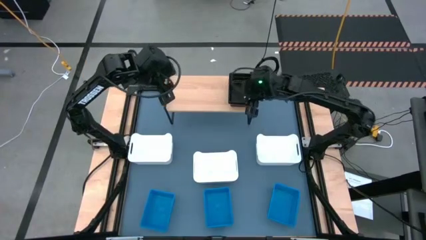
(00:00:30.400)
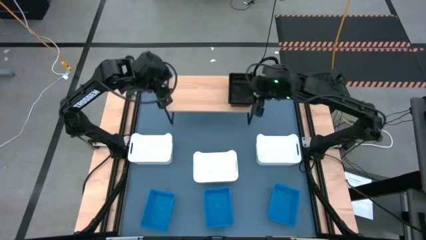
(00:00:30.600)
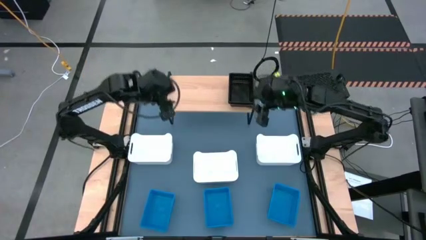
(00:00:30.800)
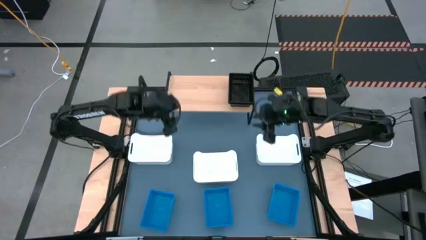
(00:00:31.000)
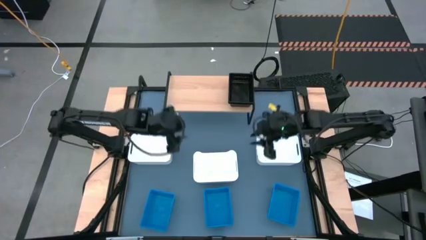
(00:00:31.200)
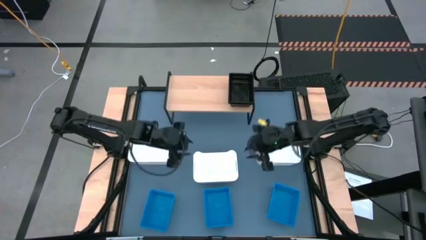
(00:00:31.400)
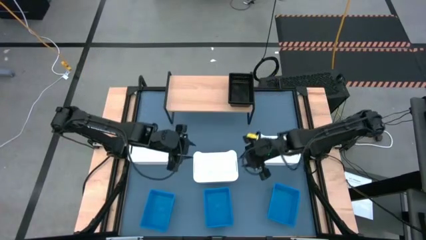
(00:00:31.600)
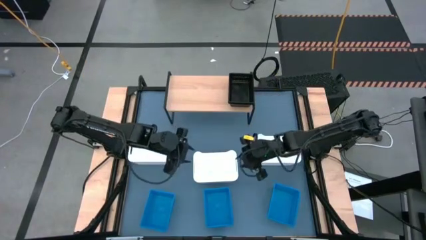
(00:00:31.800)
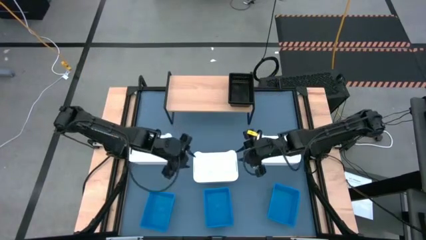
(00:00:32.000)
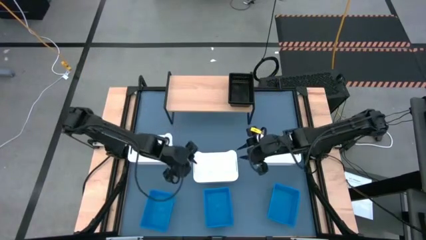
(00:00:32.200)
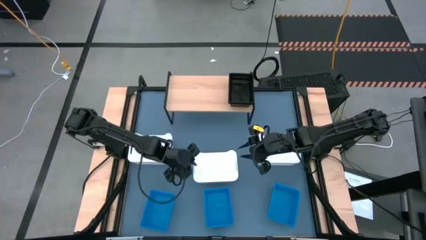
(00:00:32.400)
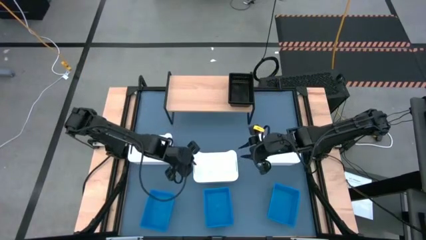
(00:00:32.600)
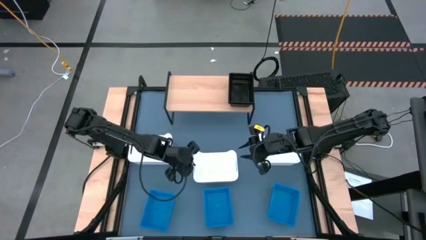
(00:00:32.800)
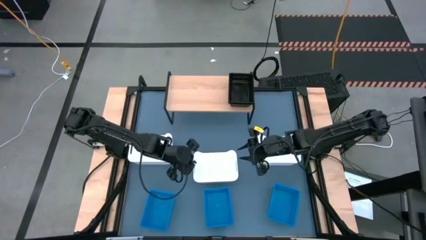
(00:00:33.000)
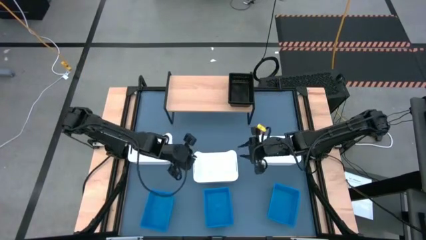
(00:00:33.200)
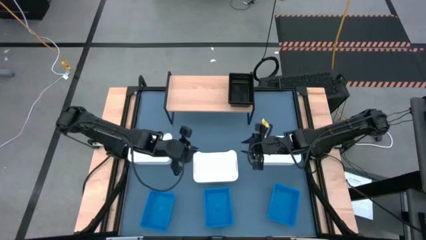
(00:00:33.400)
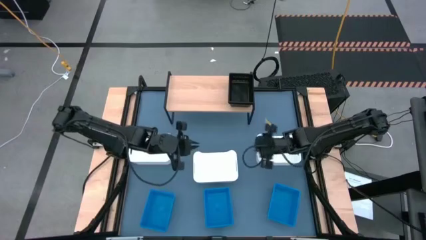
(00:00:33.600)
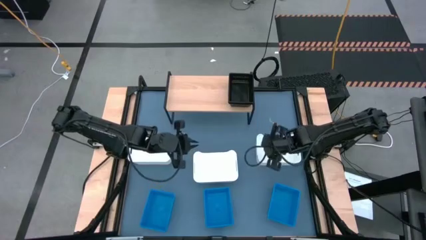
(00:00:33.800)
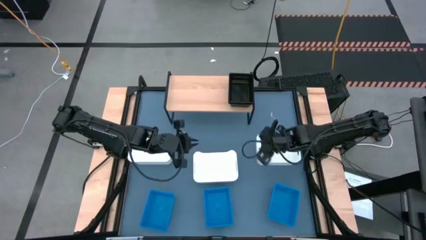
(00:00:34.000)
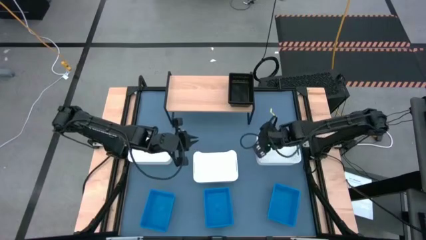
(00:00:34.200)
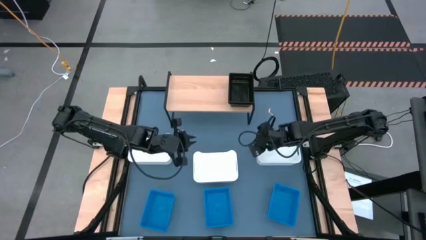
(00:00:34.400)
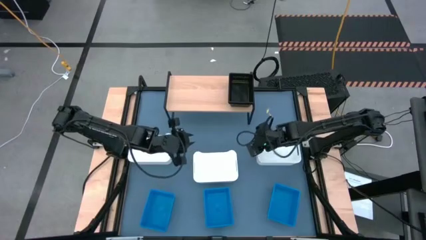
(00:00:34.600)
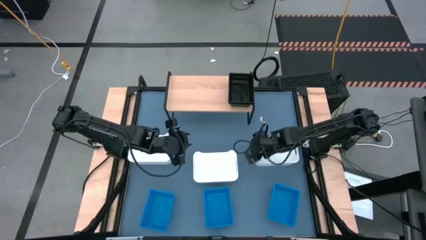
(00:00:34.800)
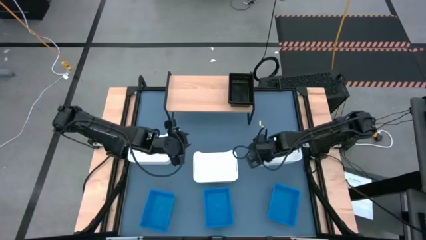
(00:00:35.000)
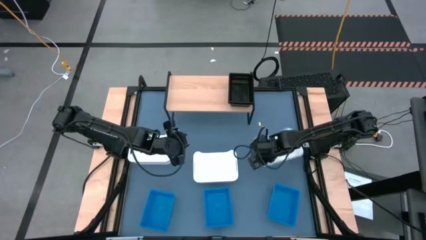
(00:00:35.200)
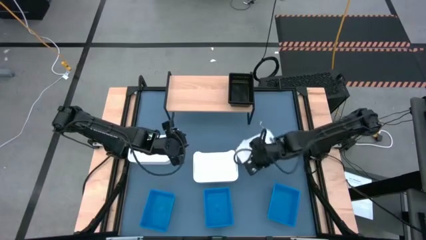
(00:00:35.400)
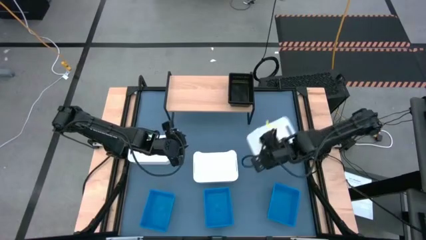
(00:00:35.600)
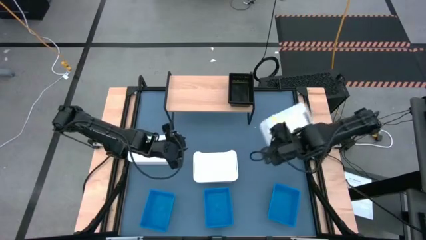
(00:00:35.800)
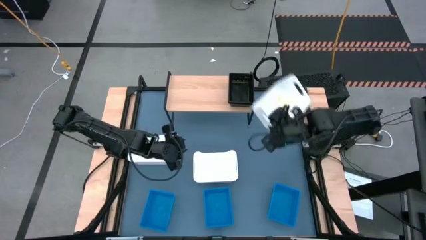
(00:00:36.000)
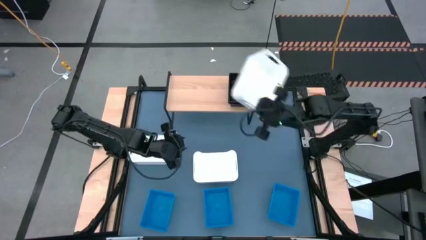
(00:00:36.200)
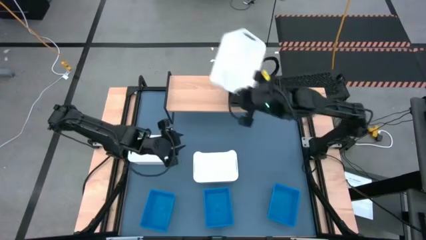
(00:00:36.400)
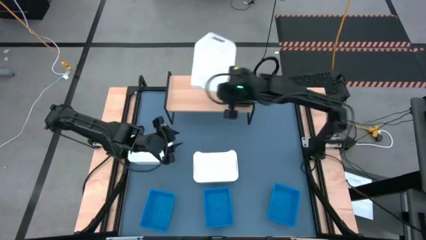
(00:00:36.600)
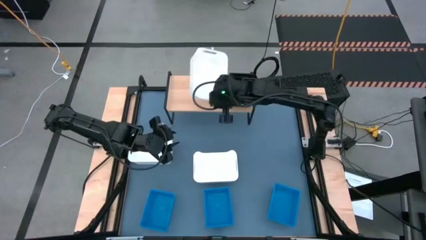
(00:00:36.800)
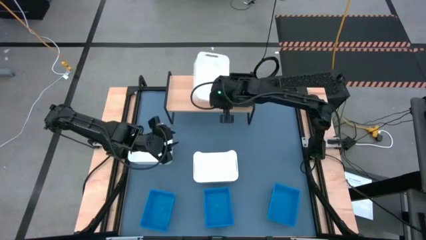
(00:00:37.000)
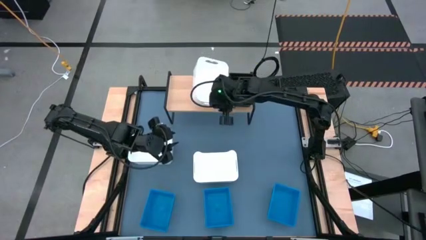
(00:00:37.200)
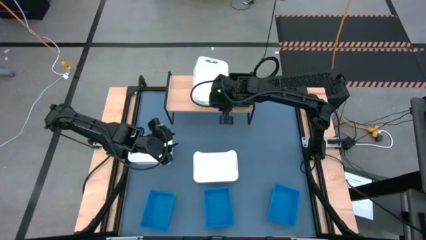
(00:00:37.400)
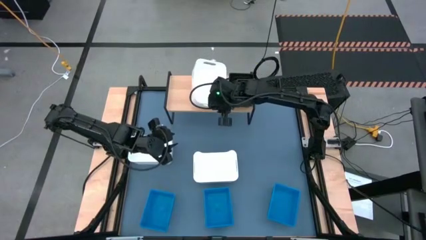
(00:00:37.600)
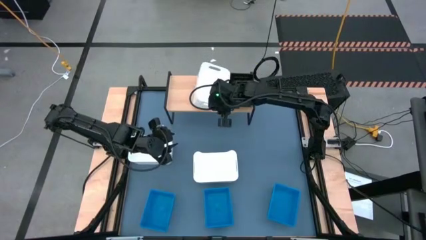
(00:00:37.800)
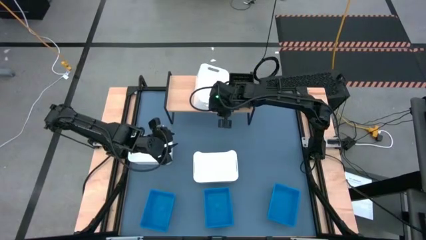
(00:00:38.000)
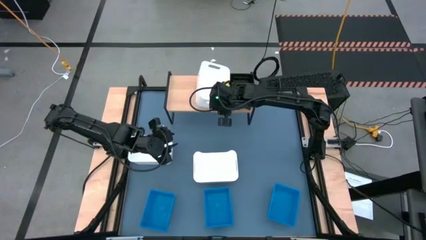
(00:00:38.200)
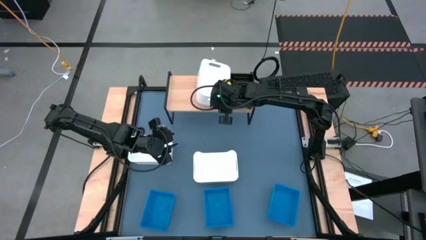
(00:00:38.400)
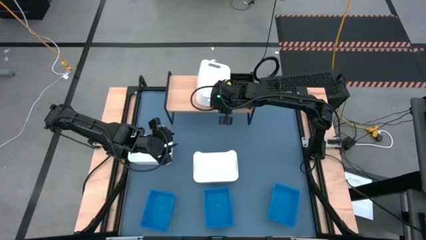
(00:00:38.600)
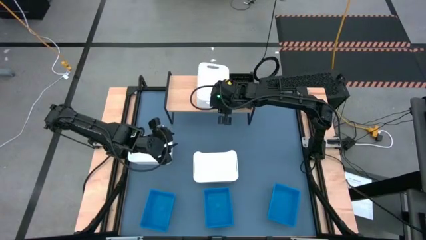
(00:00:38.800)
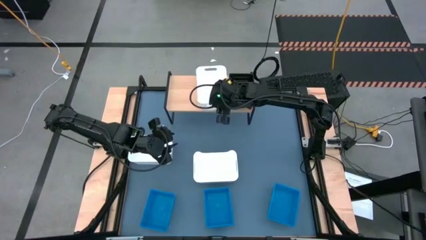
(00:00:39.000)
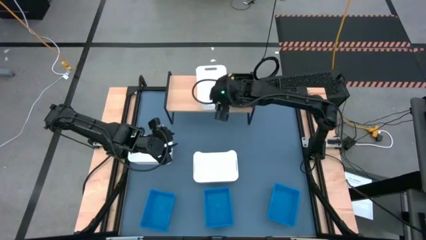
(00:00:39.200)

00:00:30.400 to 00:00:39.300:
Task: Stack baskets on shelf by color
Put the white bin on the shelf

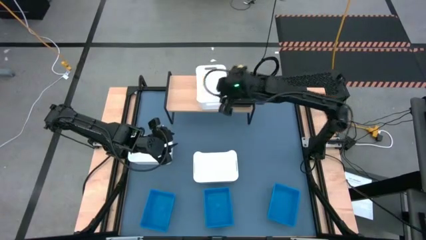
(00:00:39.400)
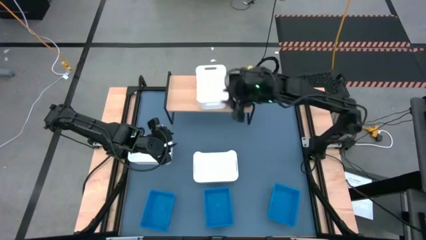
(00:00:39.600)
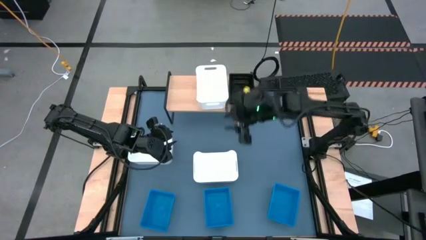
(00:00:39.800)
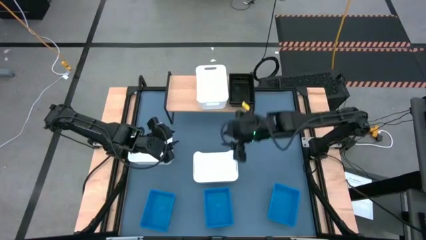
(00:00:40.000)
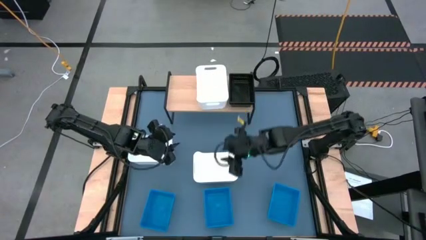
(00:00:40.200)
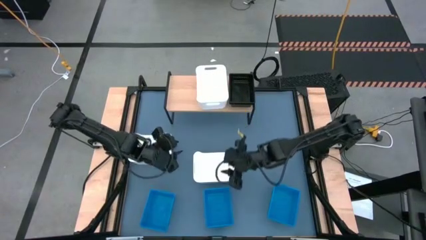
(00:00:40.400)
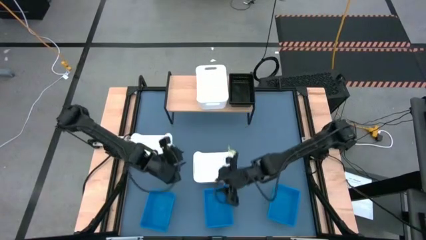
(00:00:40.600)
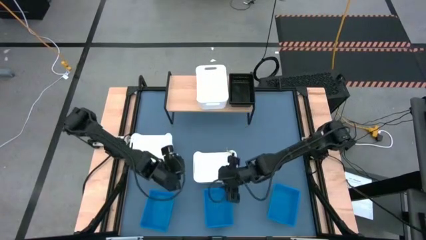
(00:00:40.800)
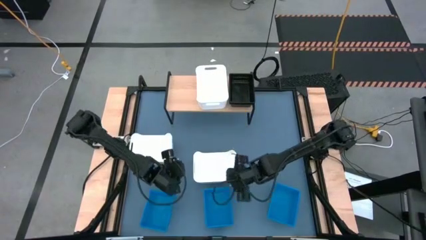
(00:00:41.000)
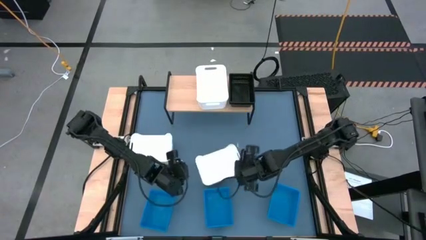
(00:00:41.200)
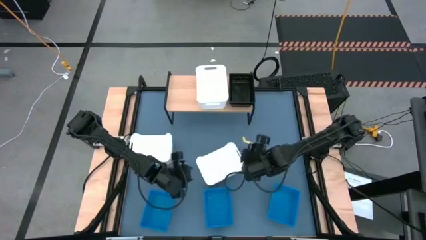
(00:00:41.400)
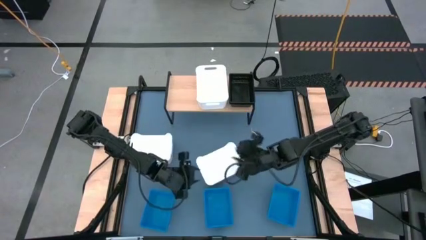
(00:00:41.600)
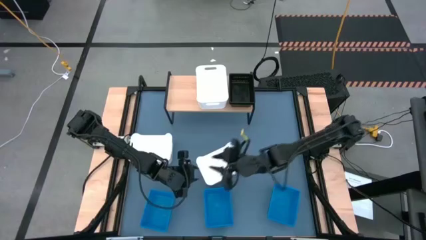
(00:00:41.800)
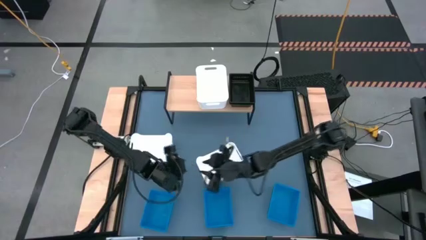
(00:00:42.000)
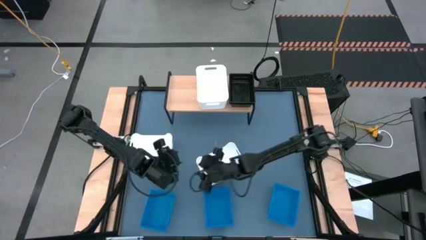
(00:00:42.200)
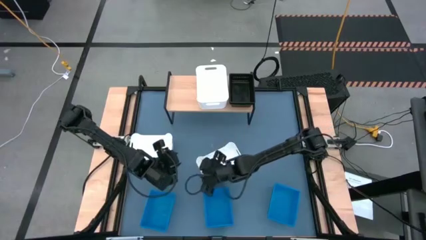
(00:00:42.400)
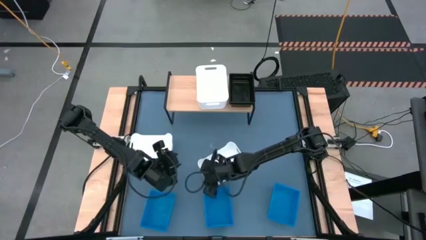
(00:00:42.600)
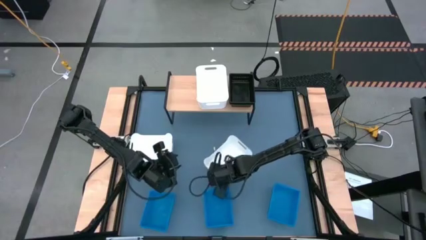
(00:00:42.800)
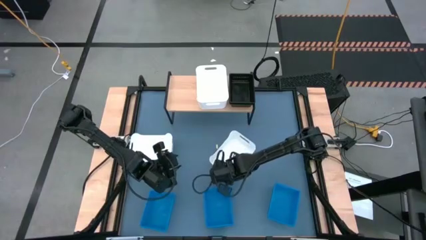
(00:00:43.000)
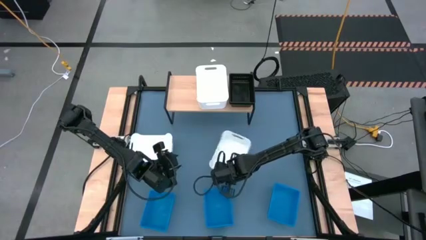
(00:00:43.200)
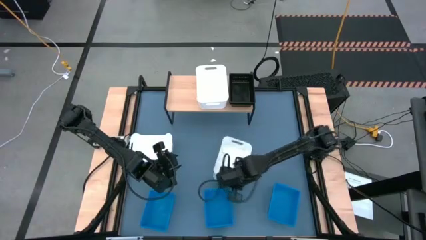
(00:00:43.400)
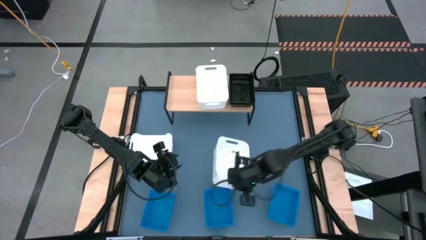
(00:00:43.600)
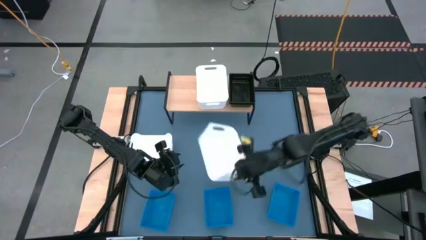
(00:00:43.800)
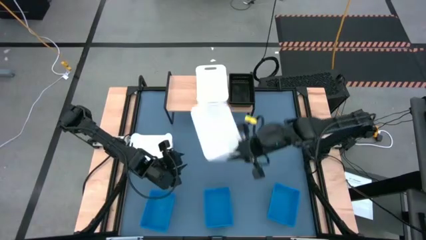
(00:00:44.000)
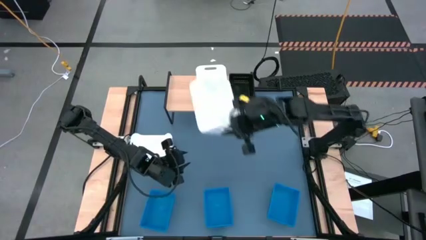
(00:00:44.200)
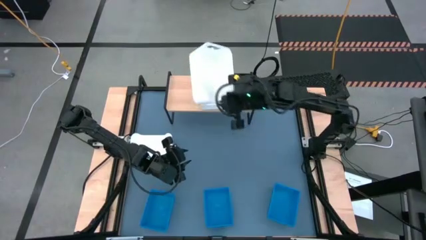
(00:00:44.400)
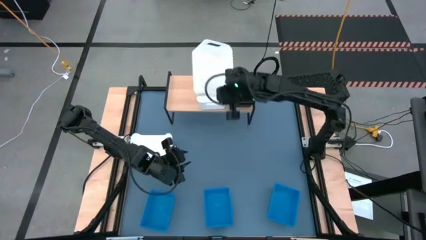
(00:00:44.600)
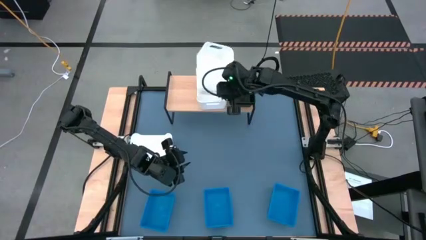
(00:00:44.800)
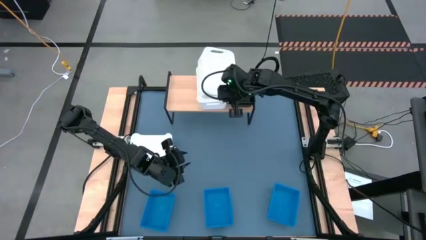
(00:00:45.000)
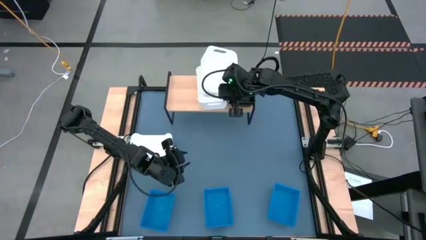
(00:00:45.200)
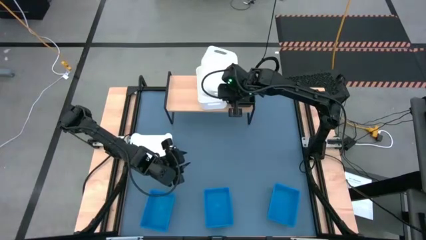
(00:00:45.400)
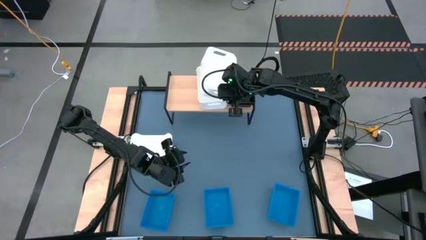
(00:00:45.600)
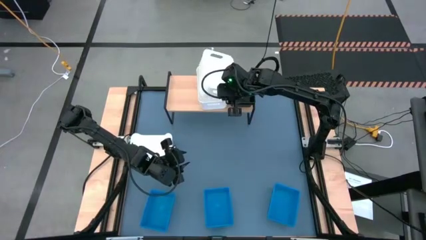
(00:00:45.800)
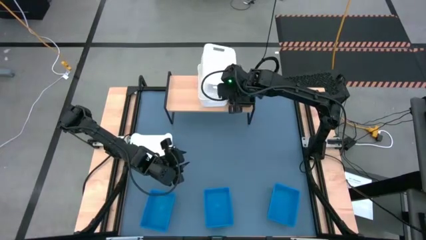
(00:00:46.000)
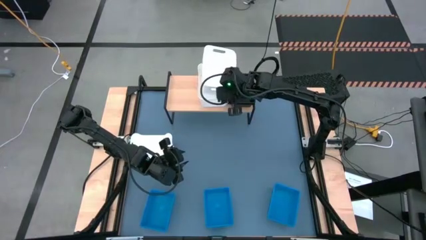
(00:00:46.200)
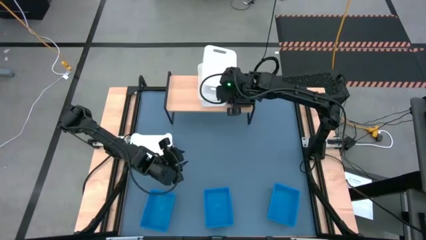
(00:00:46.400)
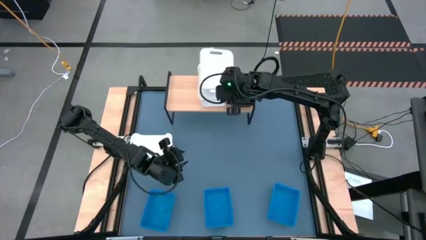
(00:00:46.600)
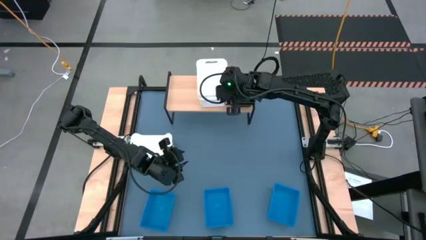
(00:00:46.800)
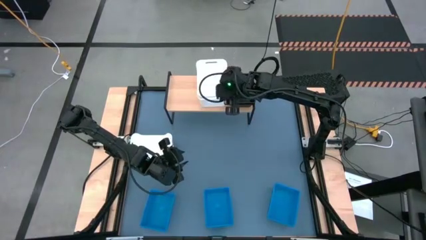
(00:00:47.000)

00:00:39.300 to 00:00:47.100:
Stack the white bin on the white bin on the shelf
